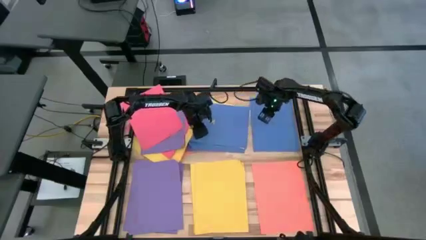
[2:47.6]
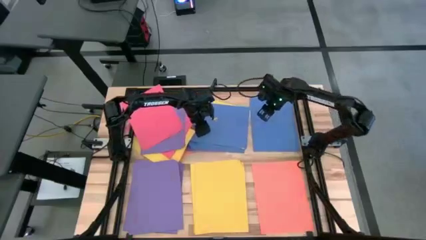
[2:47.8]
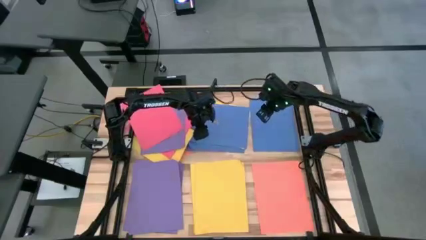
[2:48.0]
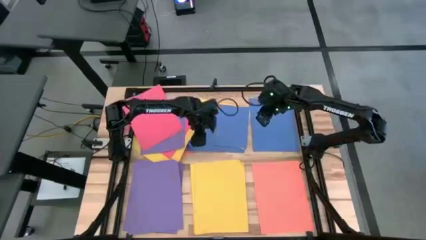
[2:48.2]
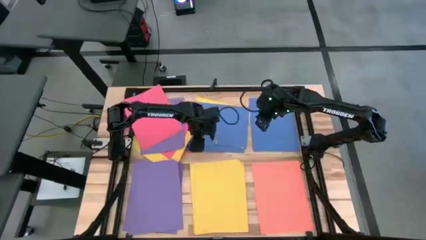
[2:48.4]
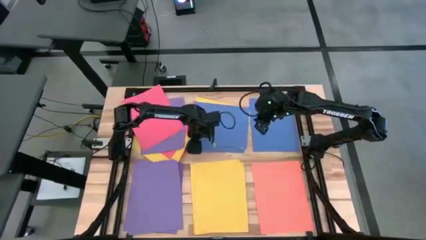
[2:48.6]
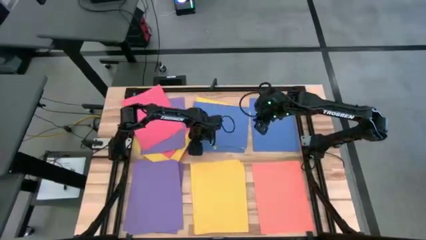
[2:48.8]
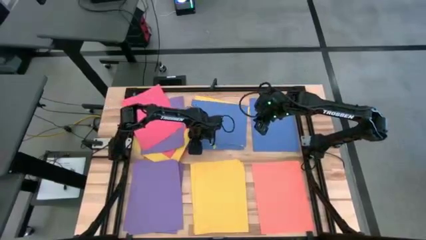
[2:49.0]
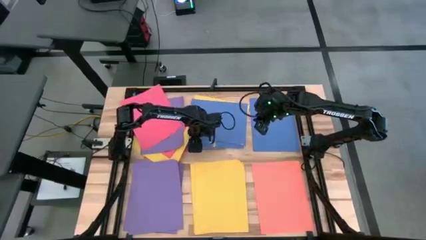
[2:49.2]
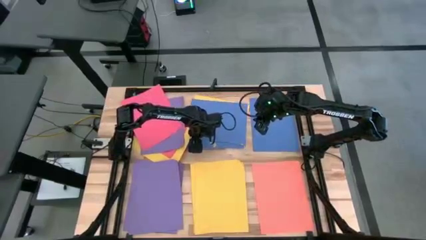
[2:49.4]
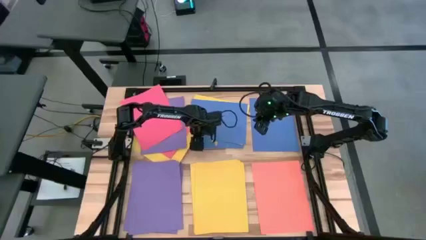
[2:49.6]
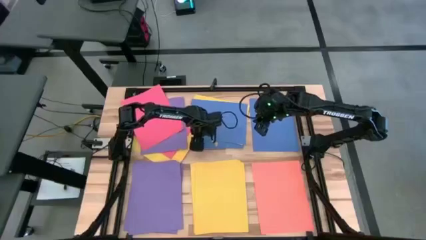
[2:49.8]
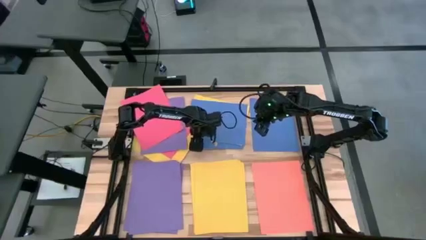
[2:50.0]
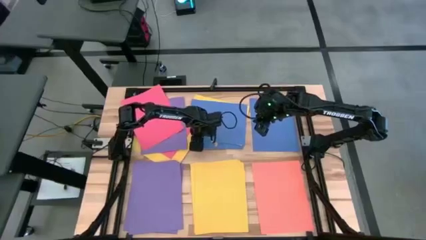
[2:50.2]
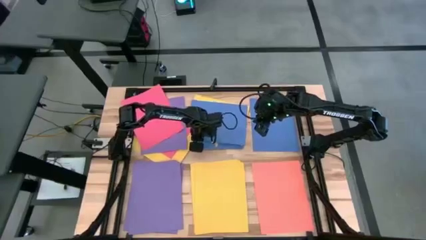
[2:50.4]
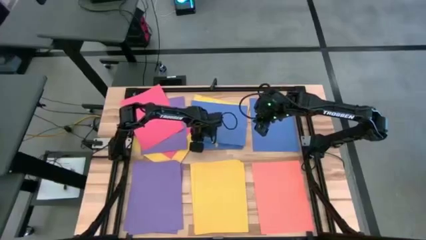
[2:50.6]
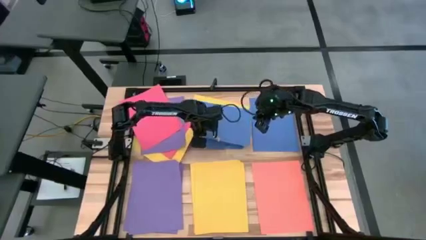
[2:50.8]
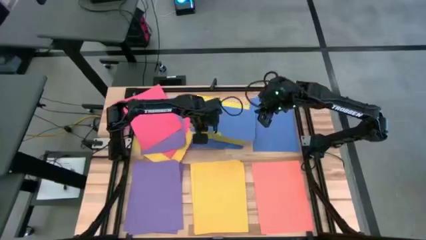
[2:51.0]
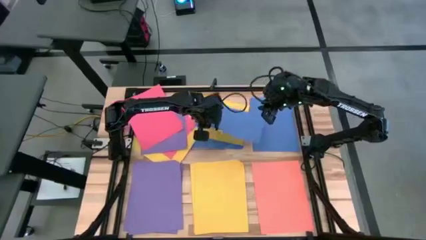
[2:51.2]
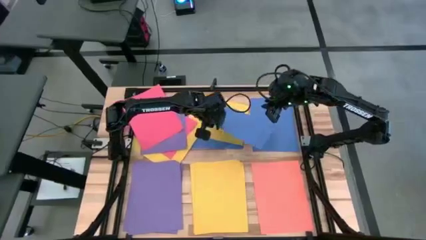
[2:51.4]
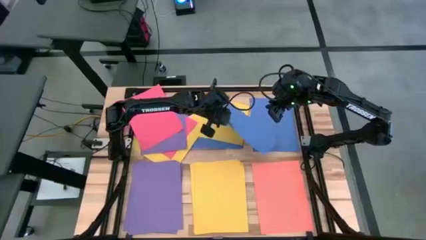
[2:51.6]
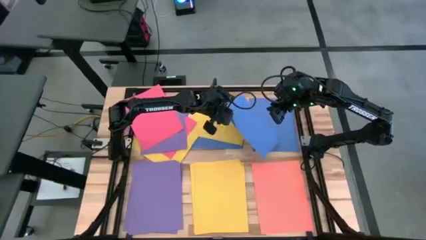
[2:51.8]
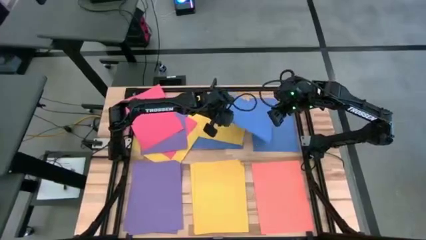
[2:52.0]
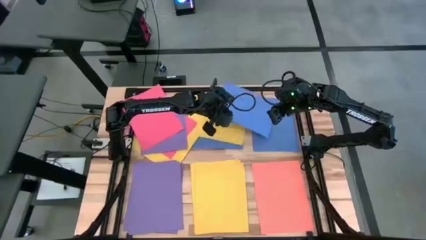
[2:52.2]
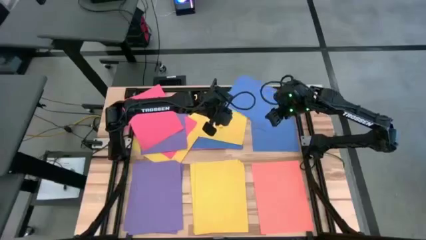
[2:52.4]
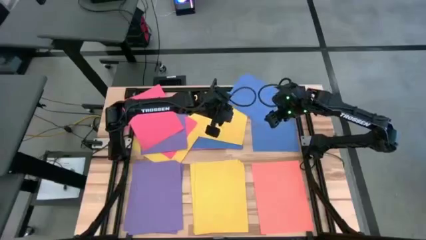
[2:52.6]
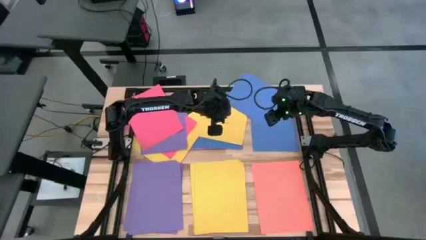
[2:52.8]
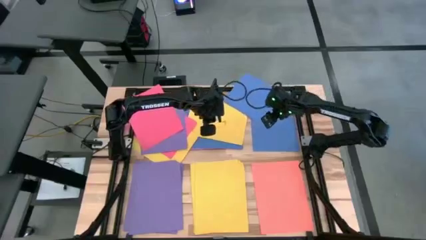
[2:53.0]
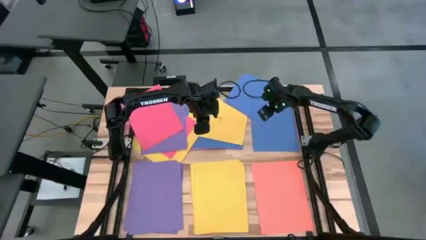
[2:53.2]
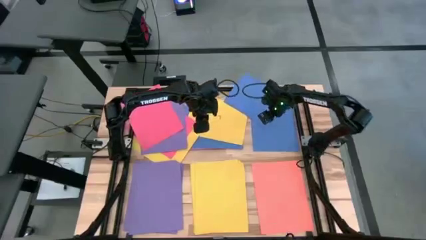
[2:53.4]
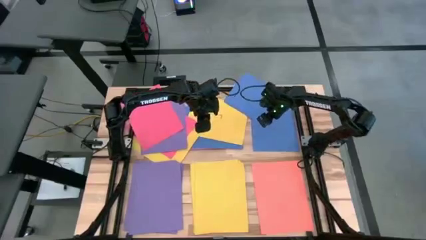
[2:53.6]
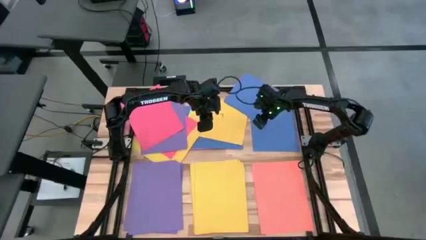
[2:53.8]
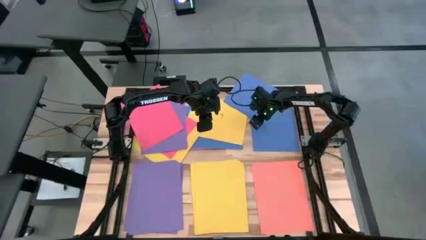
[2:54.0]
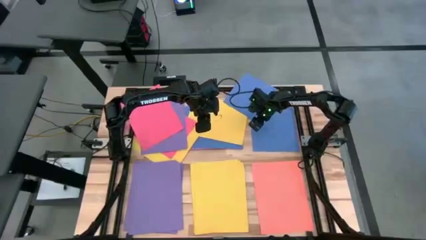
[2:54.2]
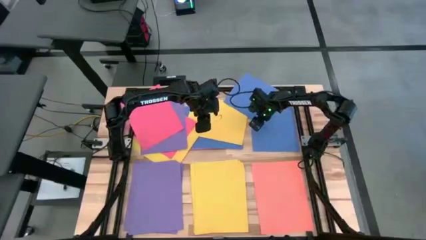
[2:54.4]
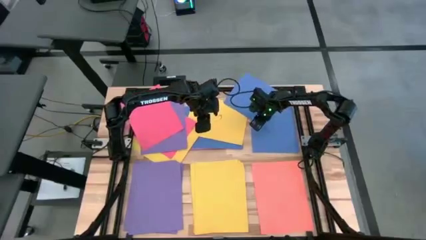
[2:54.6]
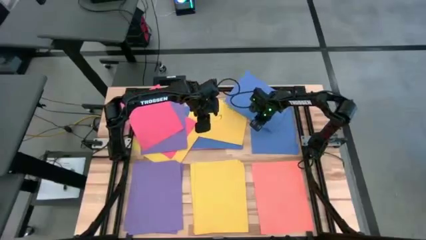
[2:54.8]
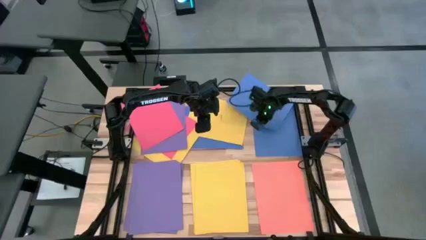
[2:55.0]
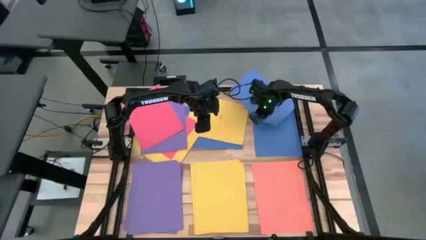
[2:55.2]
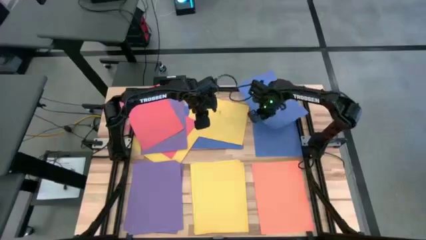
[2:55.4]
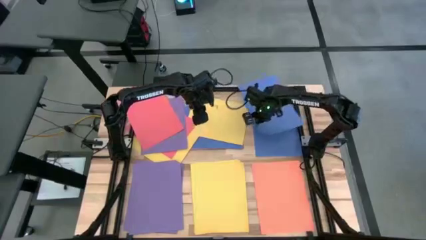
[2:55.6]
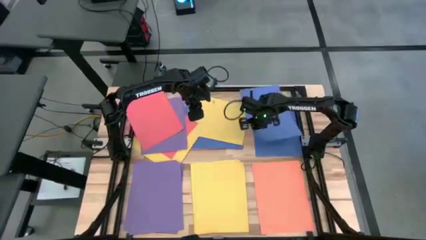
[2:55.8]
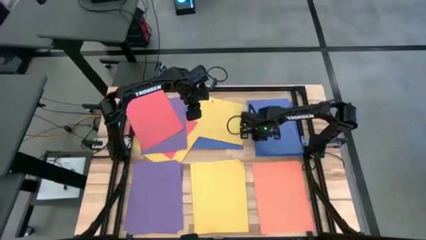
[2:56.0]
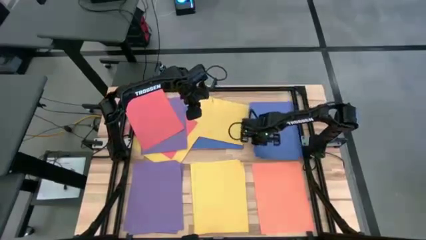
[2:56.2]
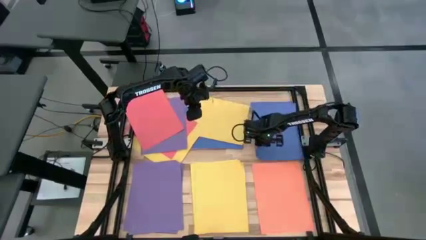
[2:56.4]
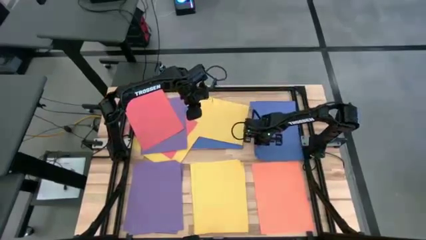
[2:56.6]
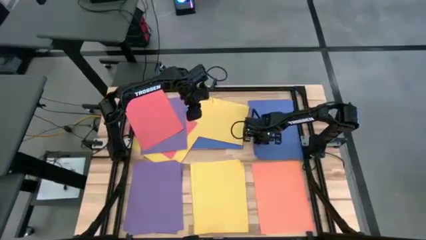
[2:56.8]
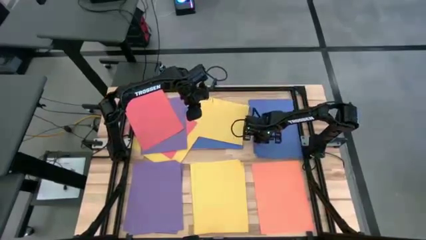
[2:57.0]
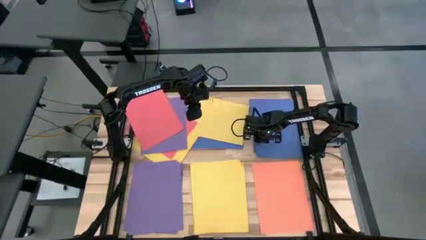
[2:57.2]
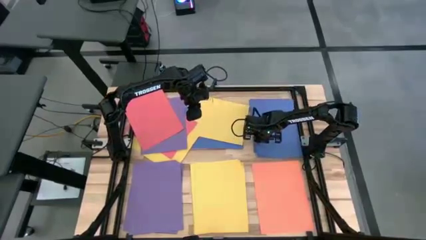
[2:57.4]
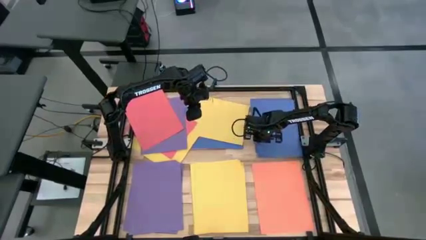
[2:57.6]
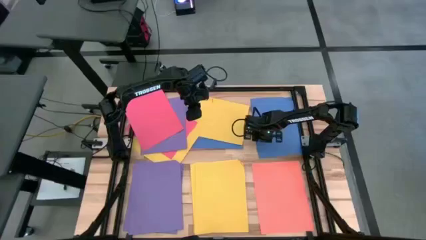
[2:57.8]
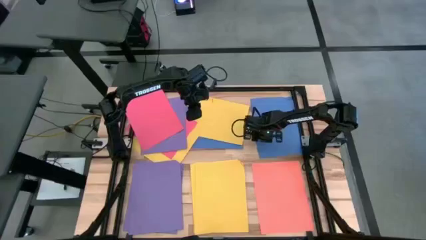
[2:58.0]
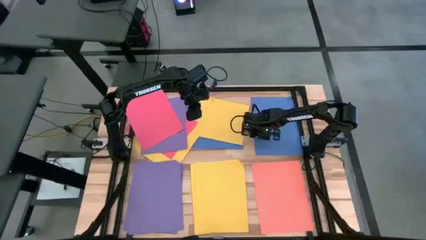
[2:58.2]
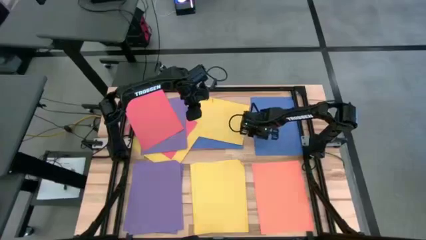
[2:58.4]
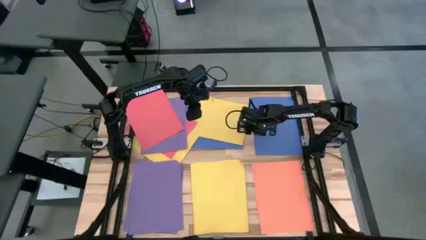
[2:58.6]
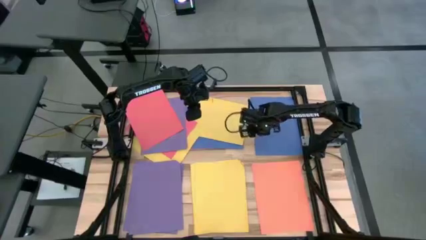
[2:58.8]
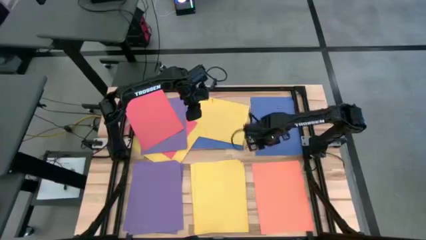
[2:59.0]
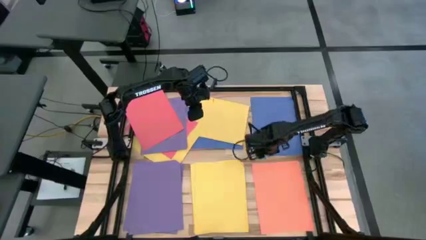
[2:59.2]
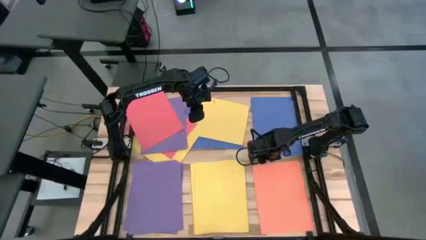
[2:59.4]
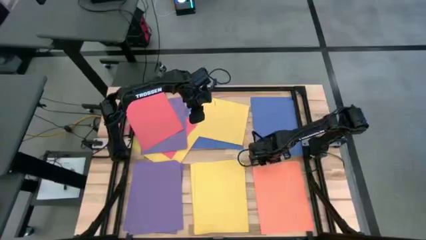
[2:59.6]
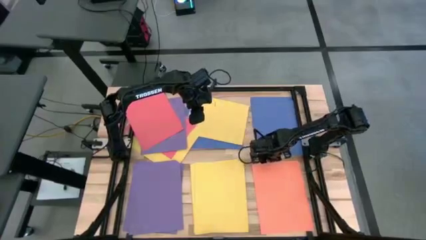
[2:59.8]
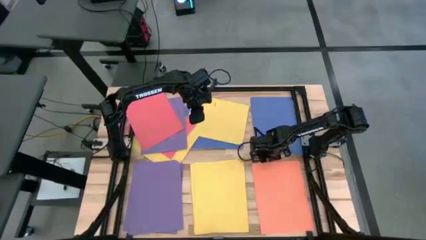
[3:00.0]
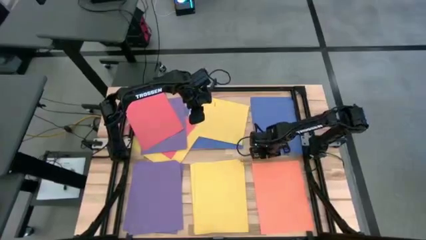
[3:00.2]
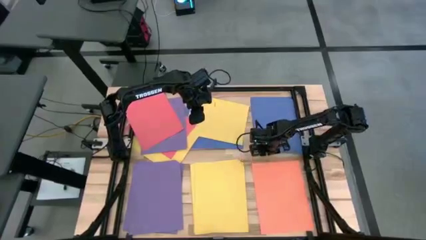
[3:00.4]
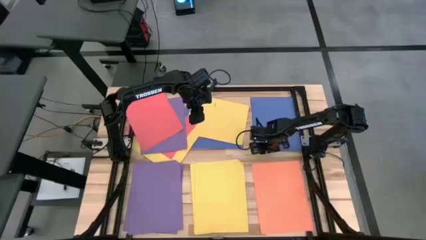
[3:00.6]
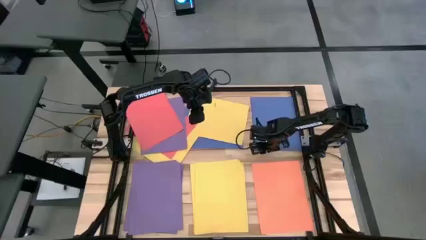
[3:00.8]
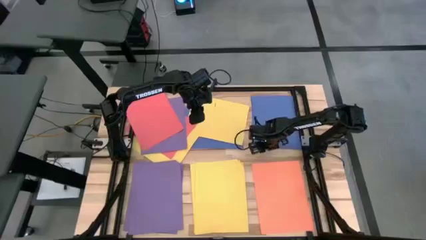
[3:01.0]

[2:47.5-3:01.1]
Task: Organize paper
Stack the blue paper on top of the blue paper
